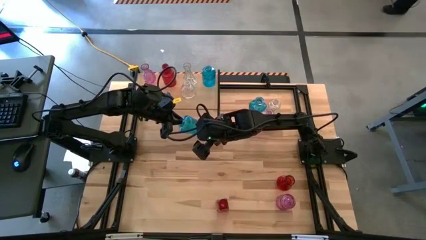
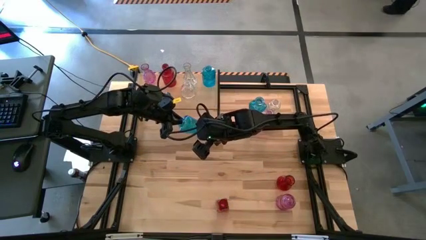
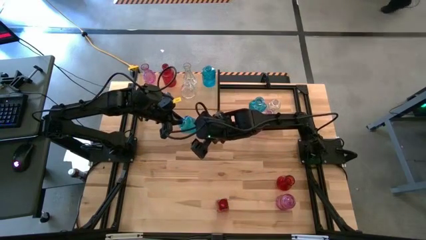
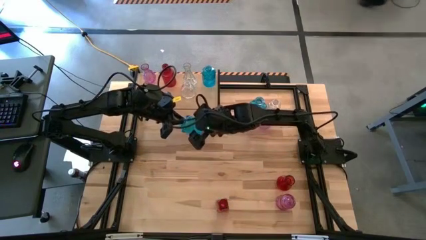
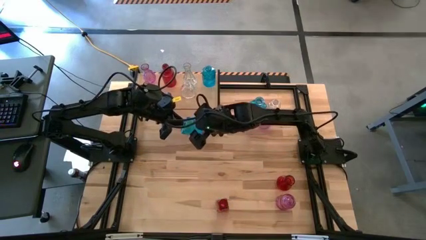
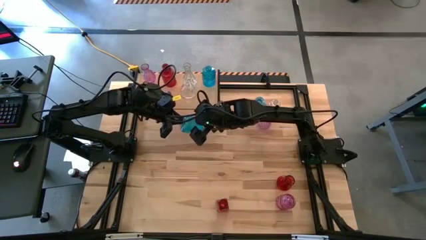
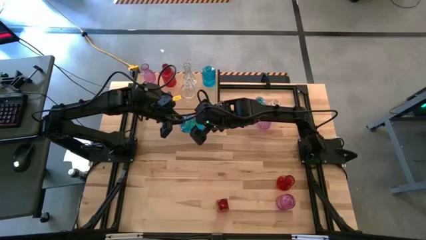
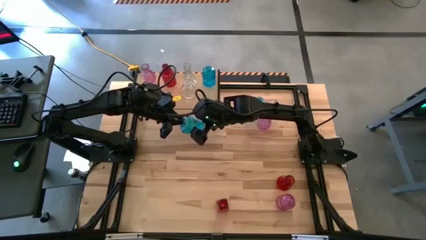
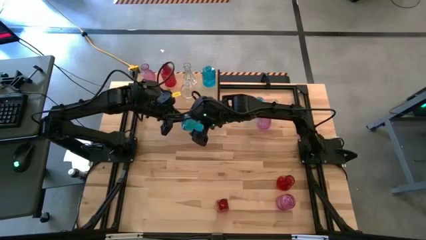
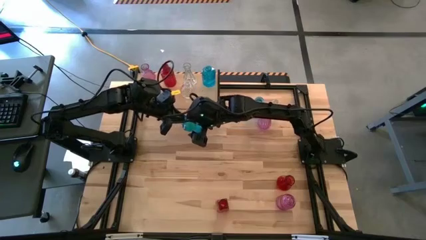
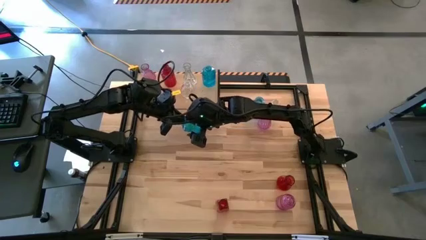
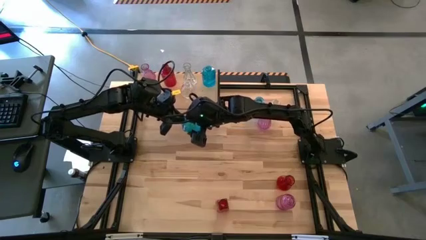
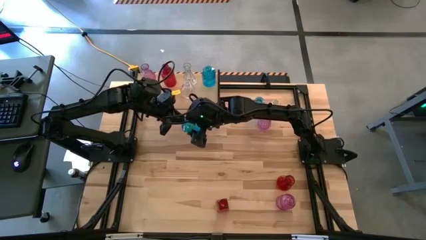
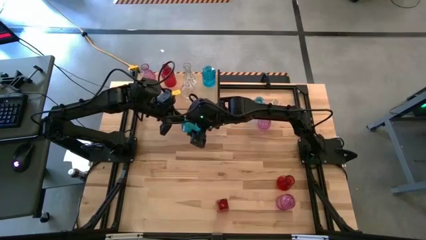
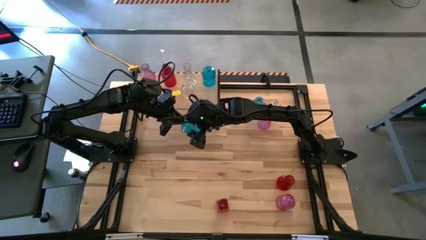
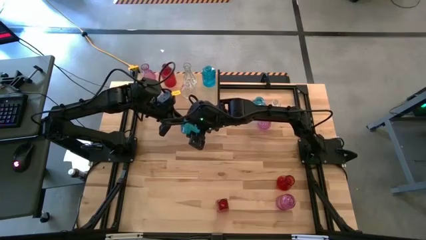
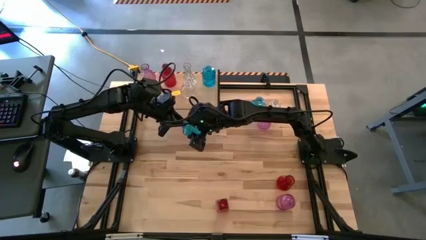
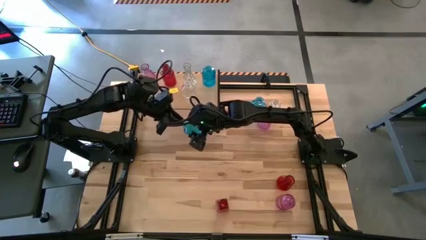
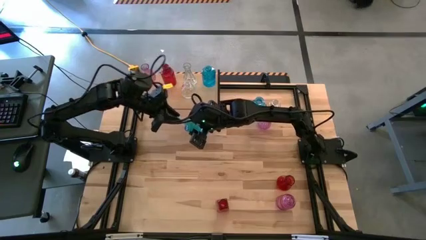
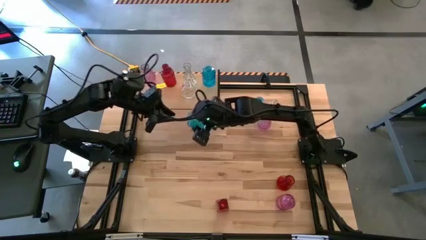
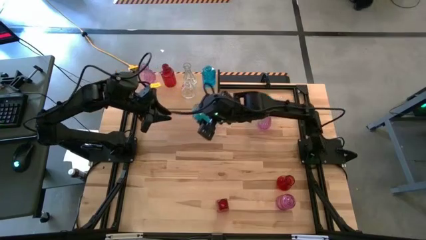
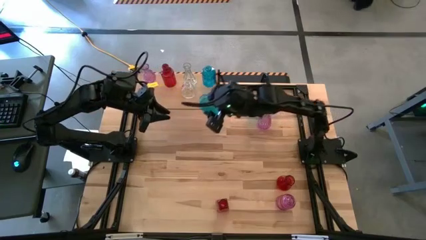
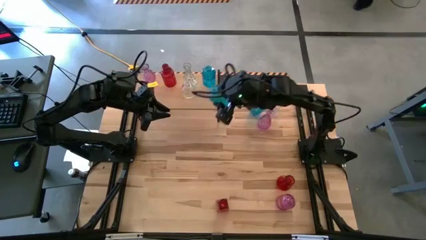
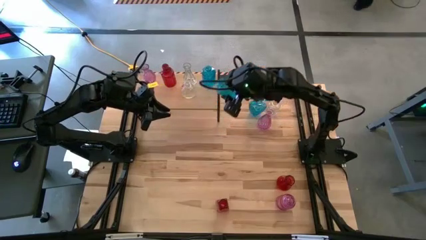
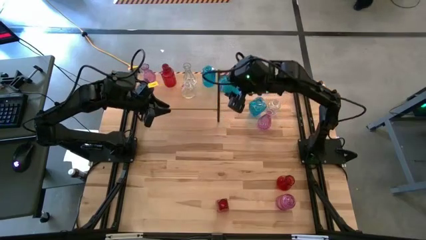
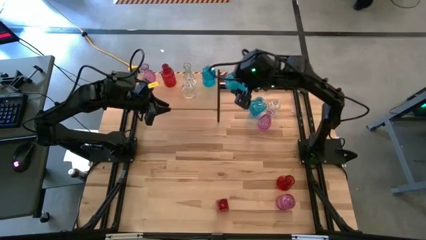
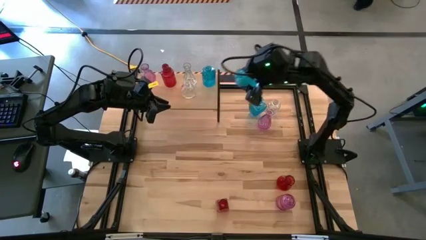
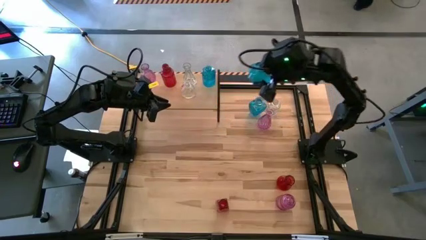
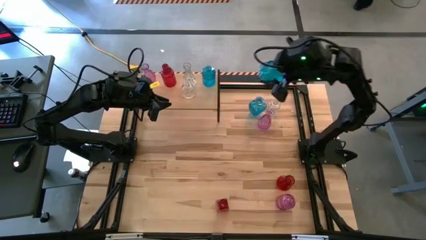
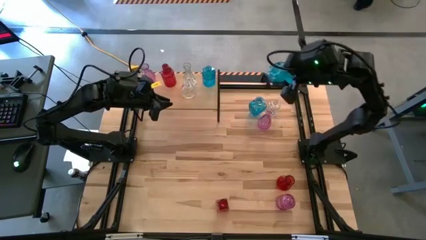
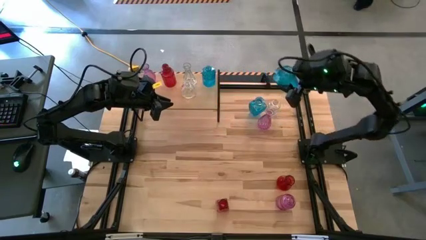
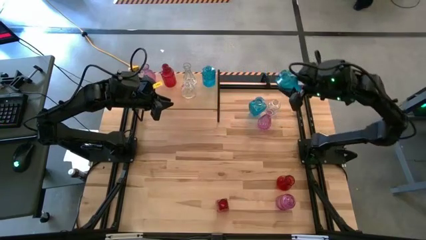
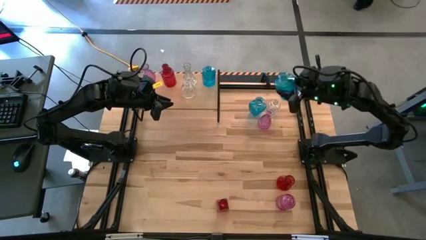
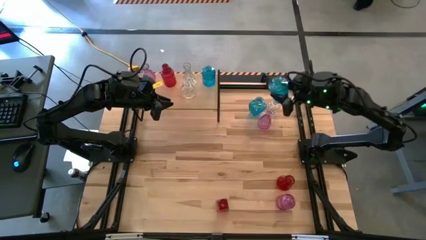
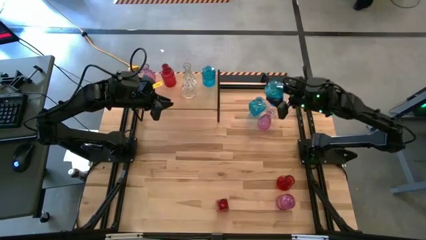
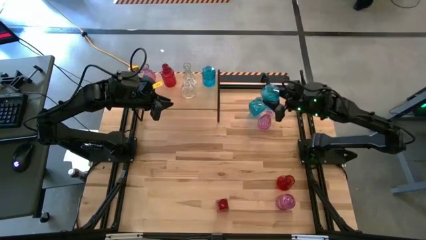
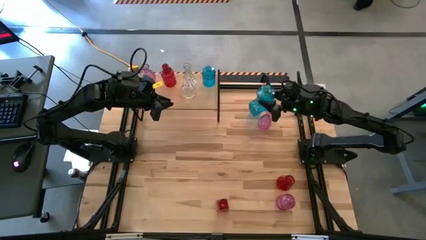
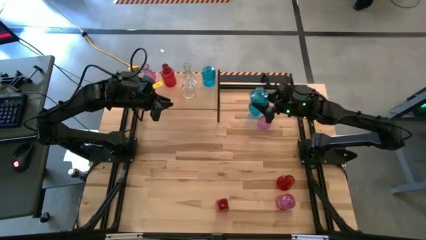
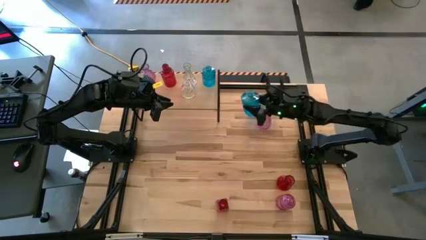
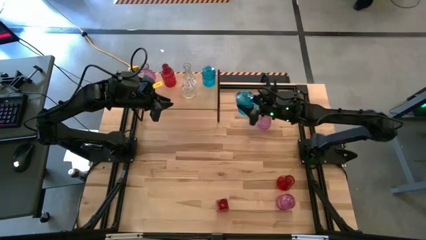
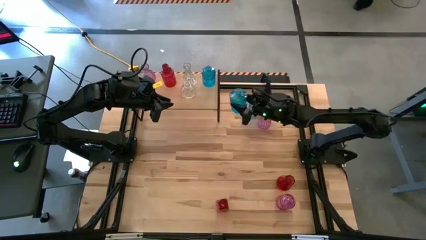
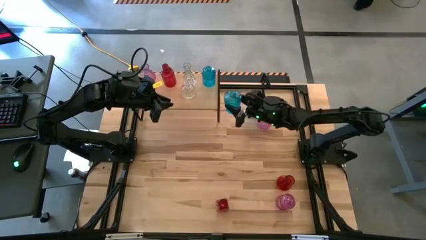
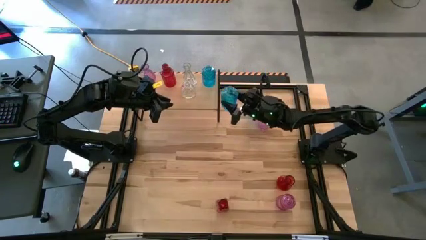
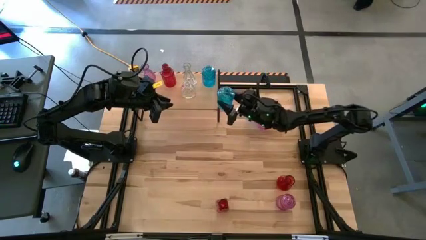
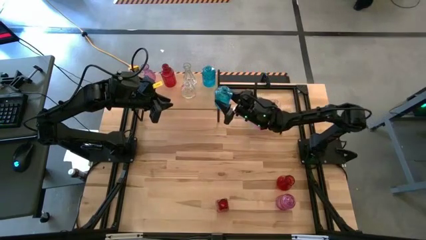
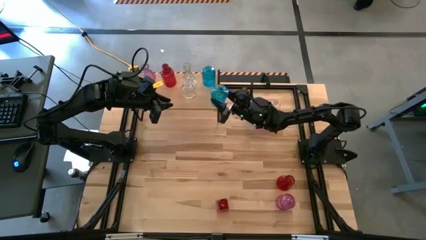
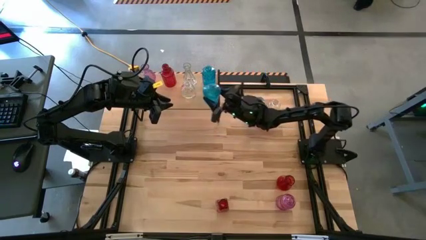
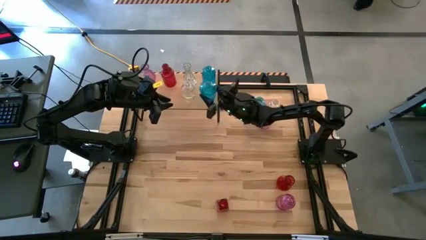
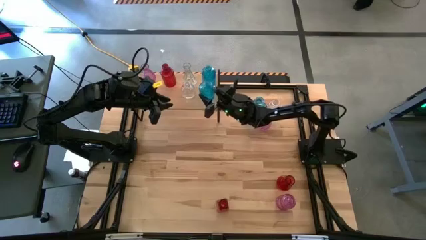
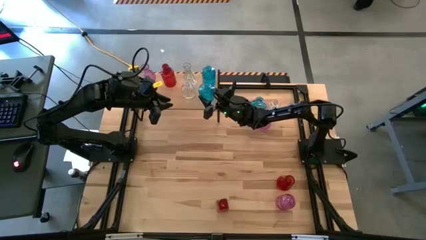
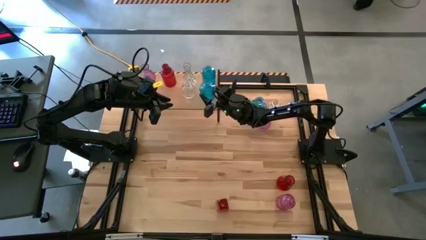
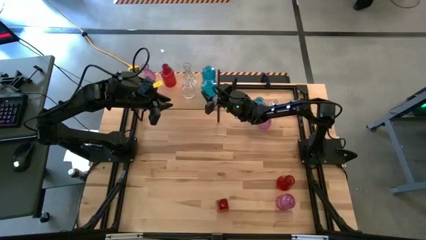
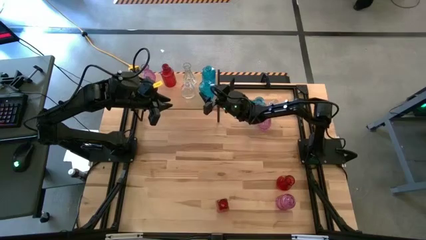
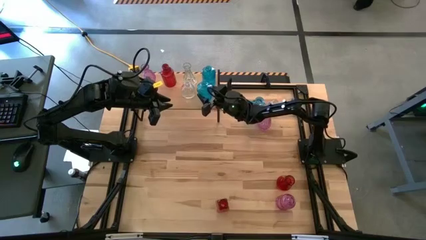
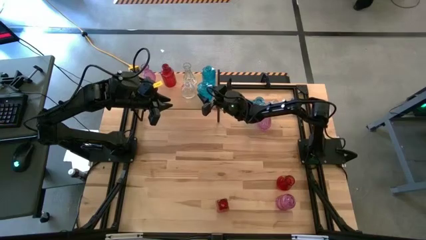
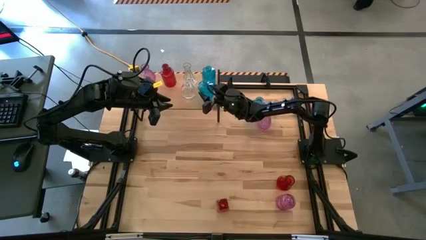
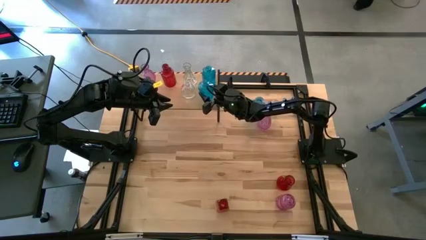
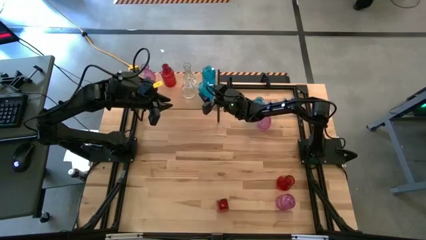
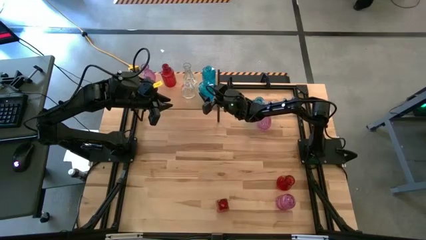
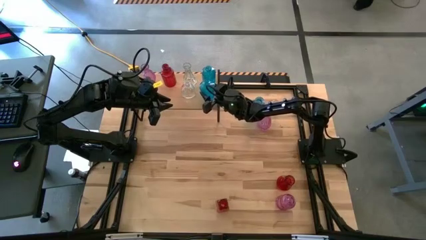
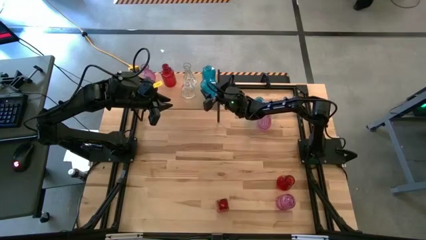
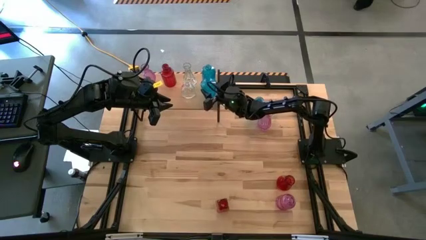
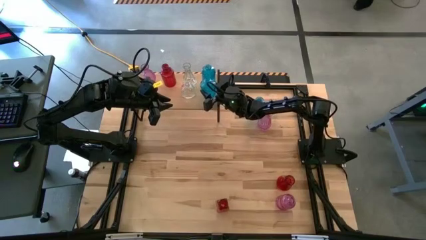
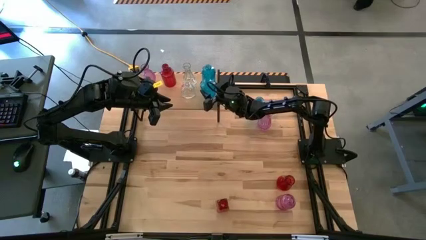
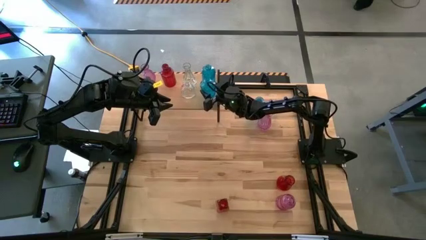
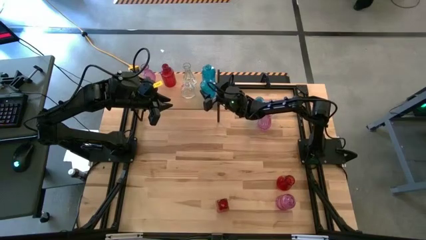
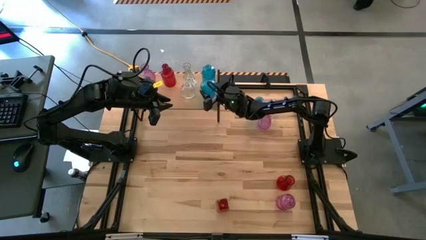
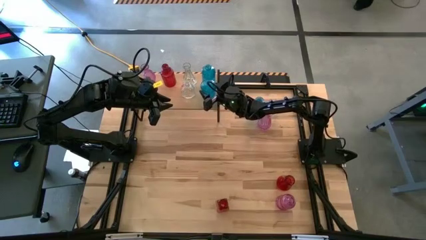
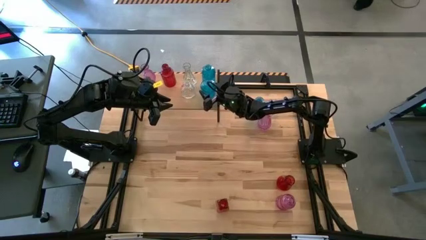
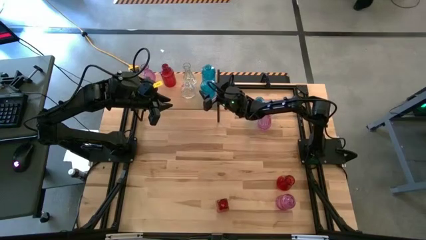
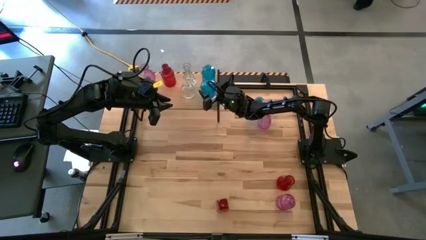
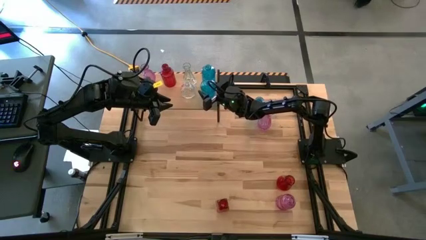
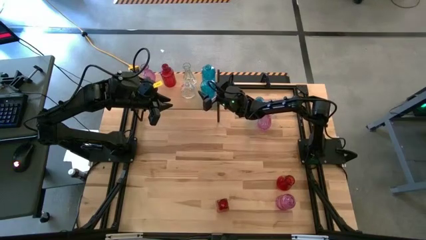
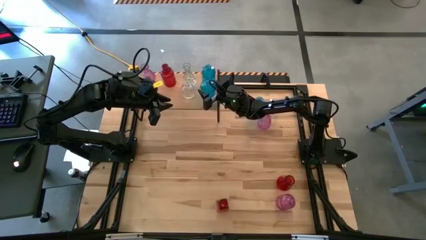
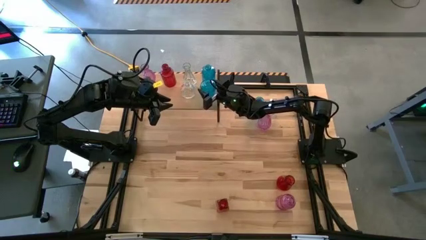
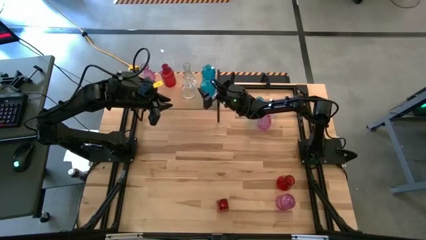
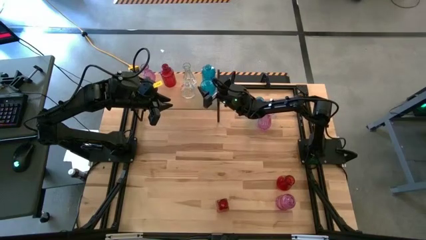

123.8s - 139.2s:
Task: sort vases onto shelf
Put the bottom blue vase on the shelf aligned with the other blue vase

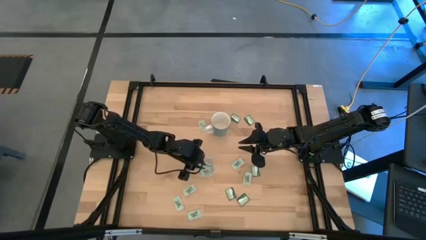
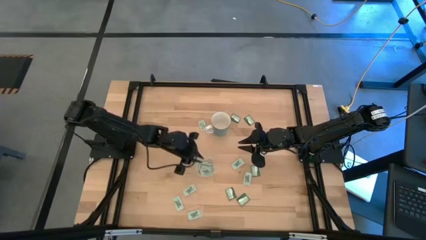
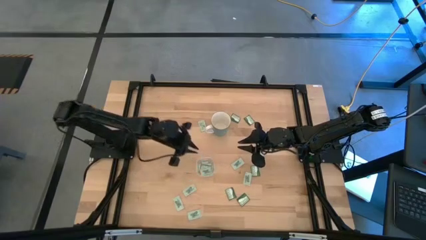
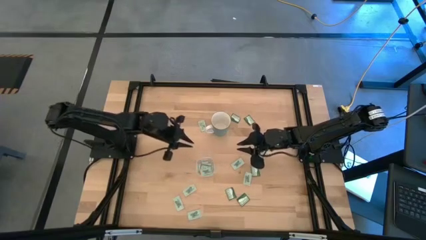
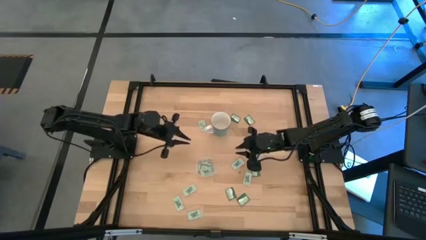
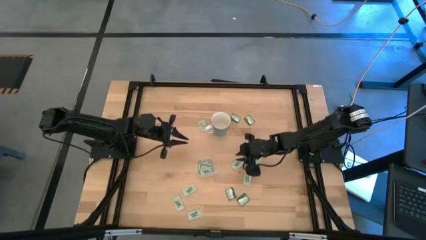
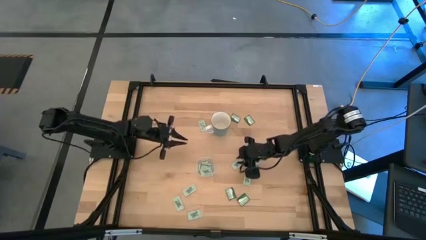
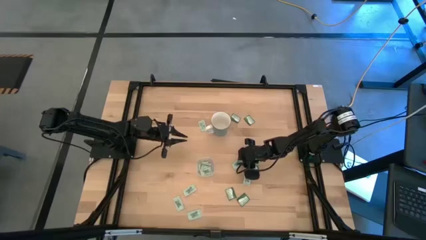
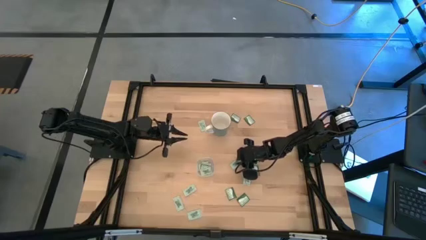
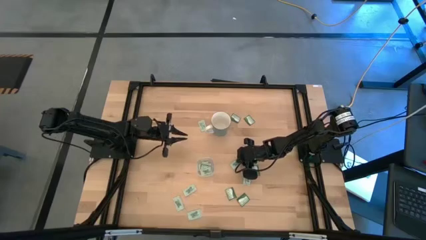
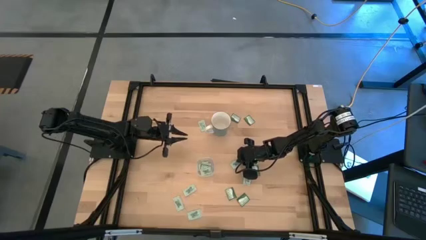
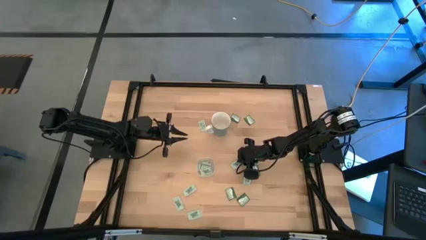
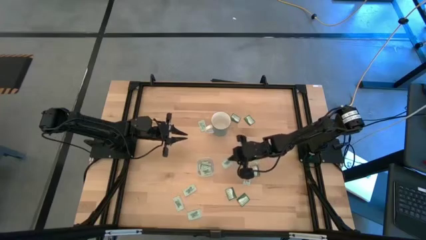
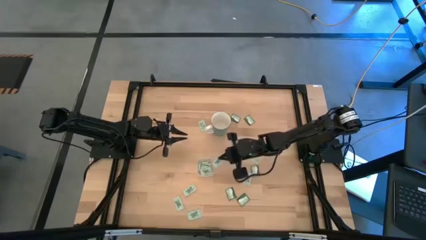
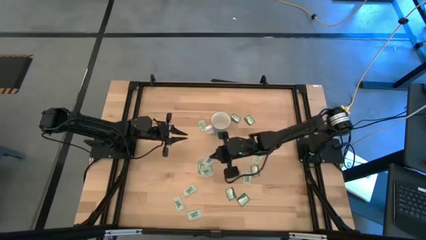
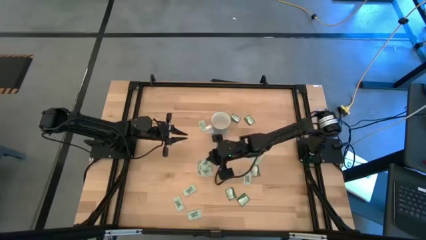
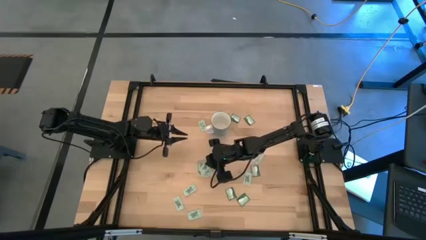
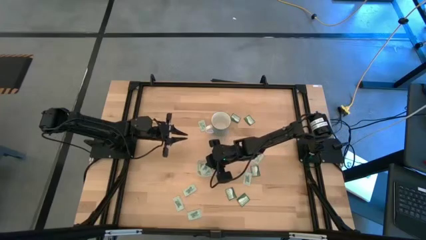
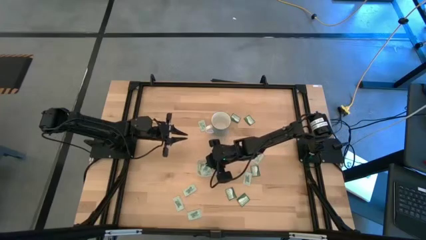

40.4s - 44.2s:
Task: Pick and place Stevia / Truvia into bins
Put the white stevia packet into the transparent bin
